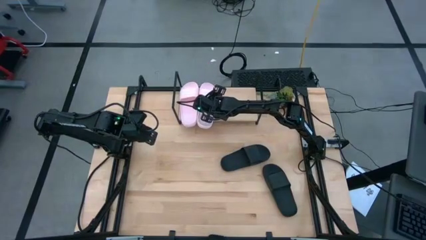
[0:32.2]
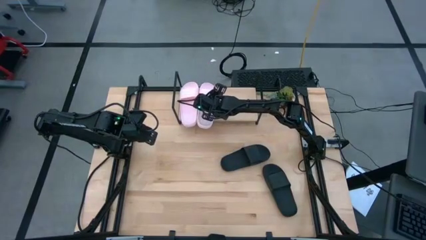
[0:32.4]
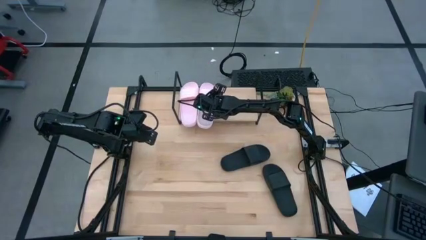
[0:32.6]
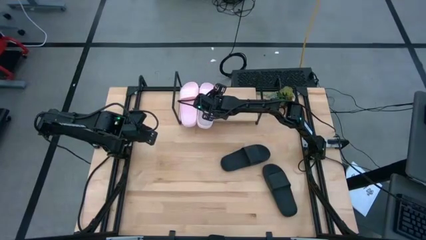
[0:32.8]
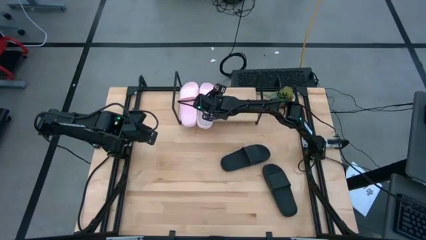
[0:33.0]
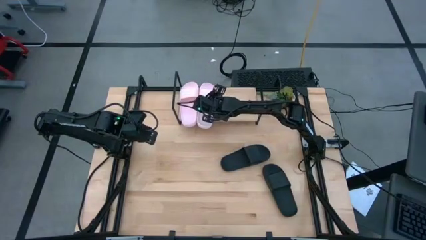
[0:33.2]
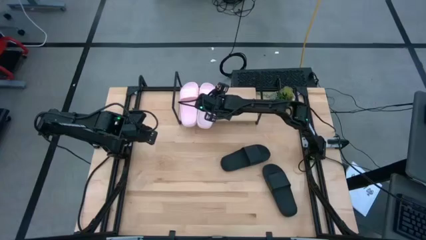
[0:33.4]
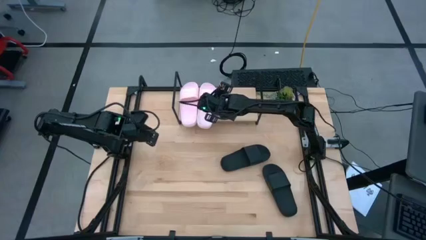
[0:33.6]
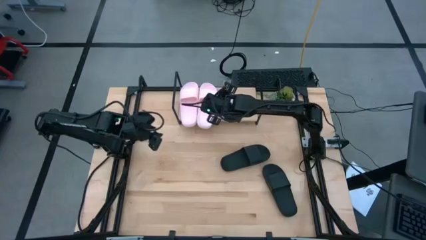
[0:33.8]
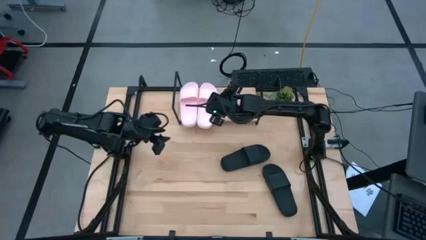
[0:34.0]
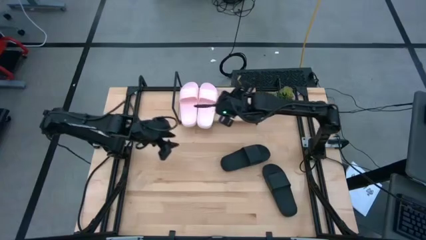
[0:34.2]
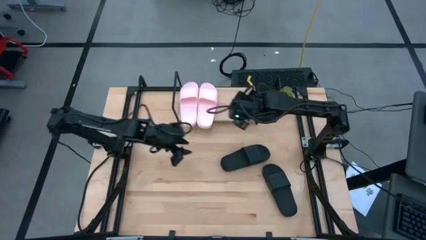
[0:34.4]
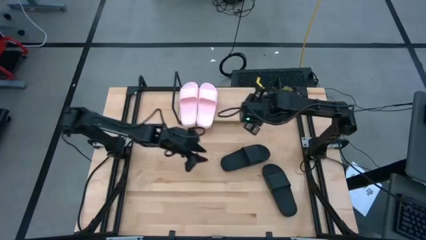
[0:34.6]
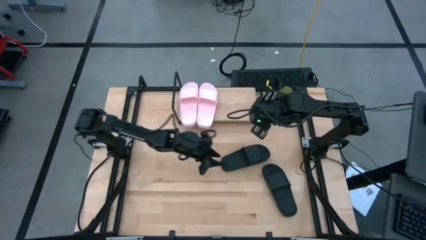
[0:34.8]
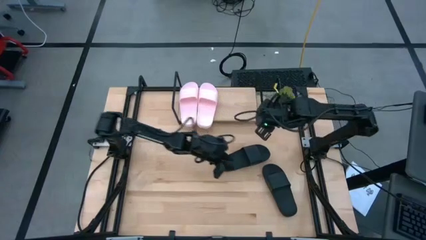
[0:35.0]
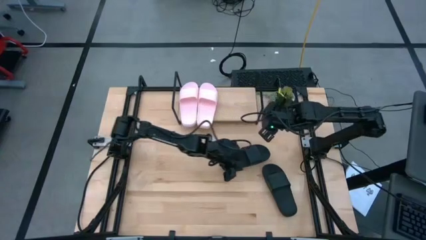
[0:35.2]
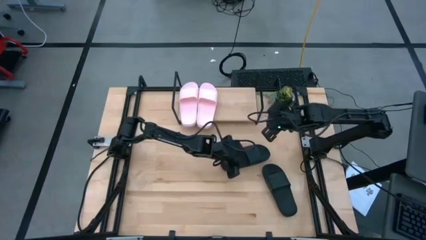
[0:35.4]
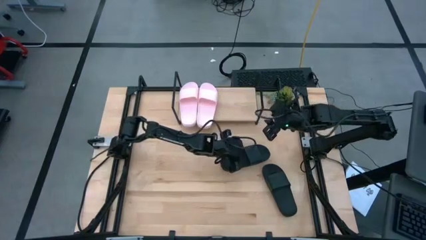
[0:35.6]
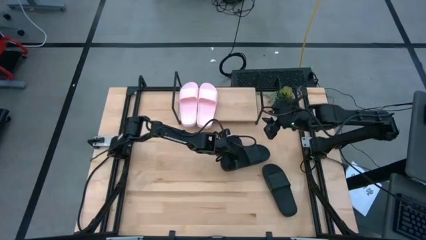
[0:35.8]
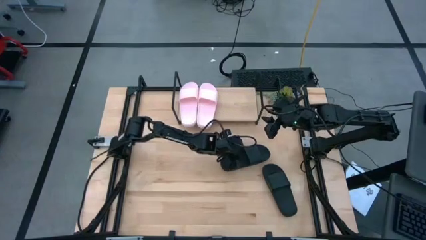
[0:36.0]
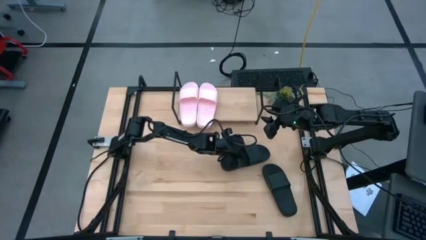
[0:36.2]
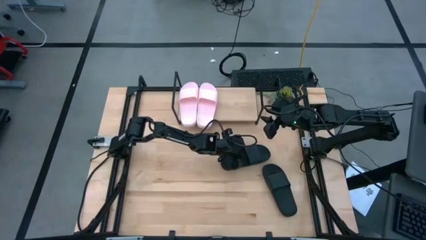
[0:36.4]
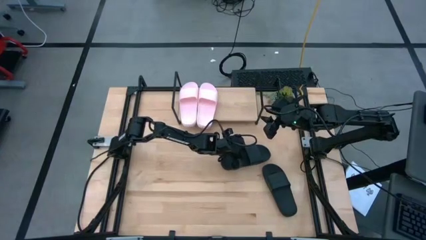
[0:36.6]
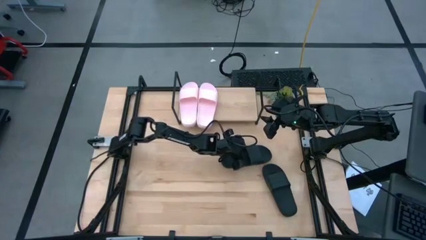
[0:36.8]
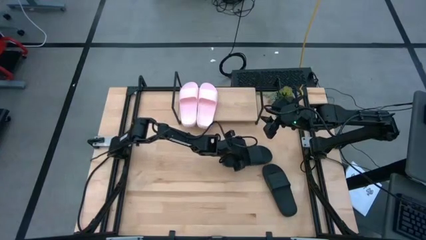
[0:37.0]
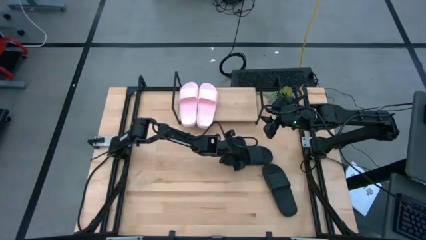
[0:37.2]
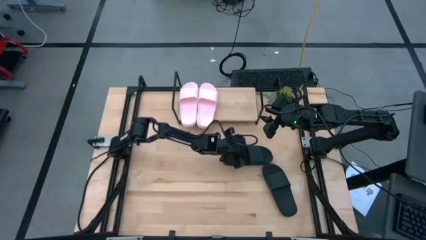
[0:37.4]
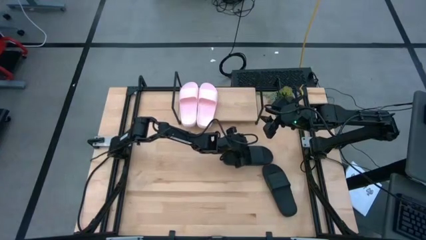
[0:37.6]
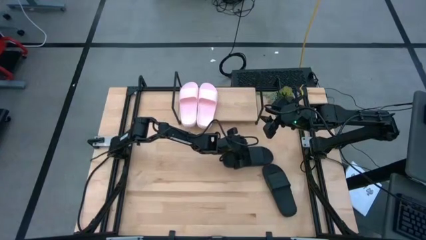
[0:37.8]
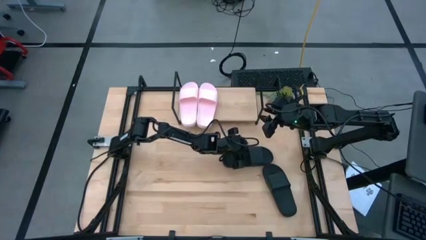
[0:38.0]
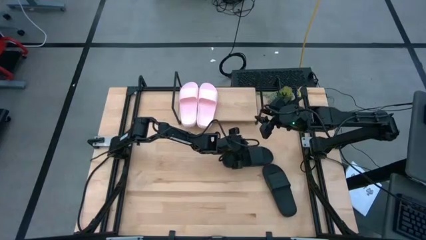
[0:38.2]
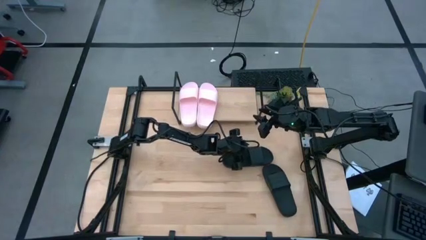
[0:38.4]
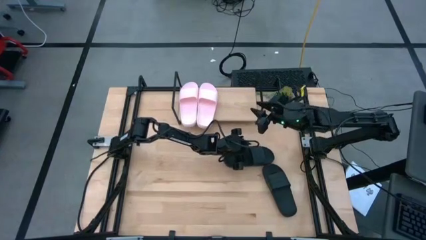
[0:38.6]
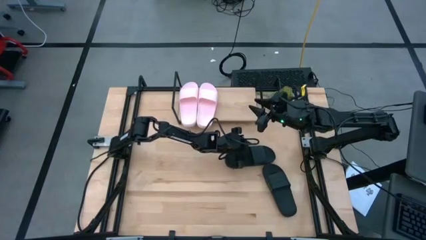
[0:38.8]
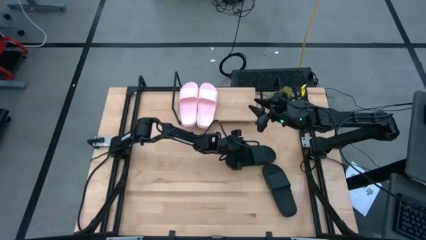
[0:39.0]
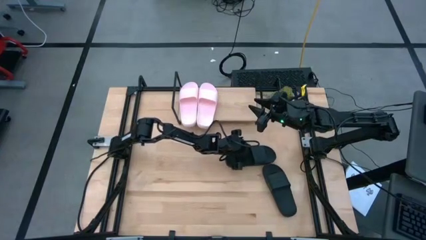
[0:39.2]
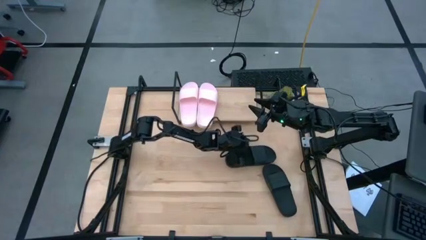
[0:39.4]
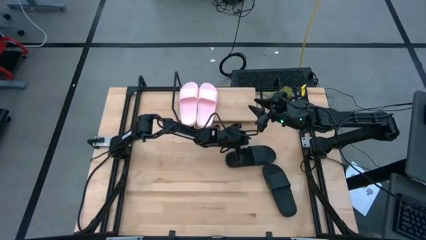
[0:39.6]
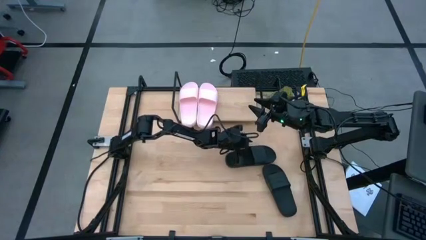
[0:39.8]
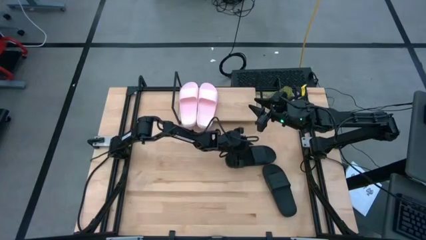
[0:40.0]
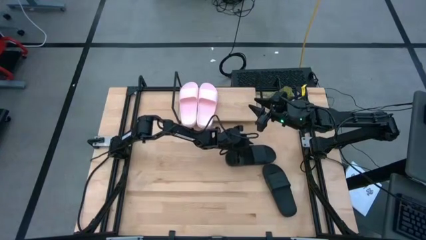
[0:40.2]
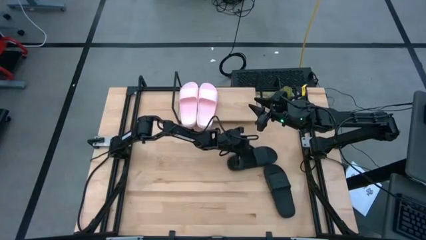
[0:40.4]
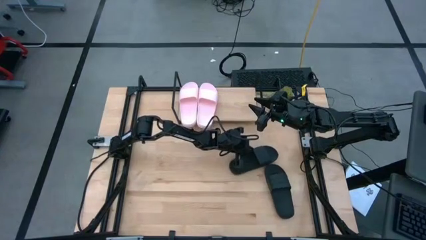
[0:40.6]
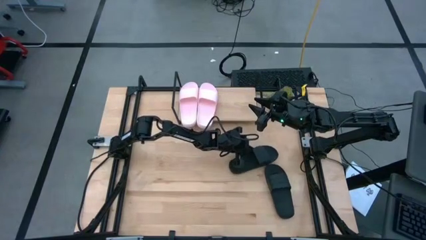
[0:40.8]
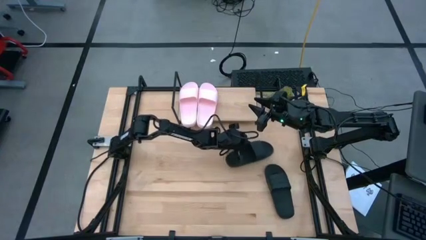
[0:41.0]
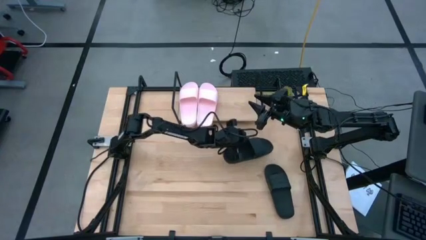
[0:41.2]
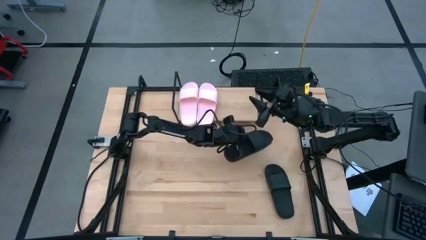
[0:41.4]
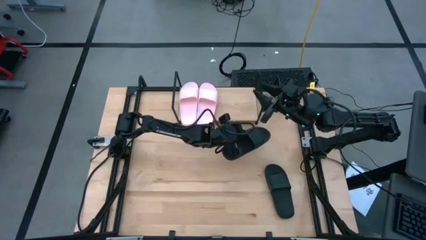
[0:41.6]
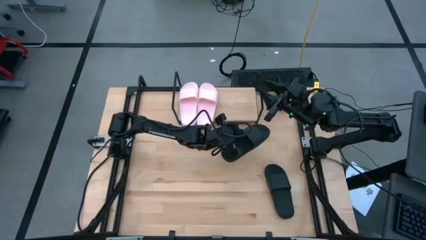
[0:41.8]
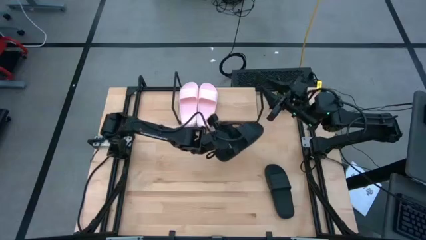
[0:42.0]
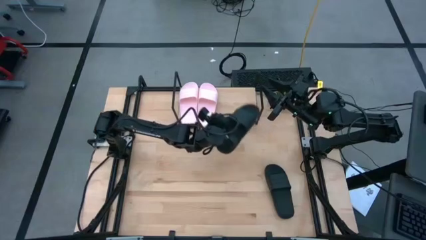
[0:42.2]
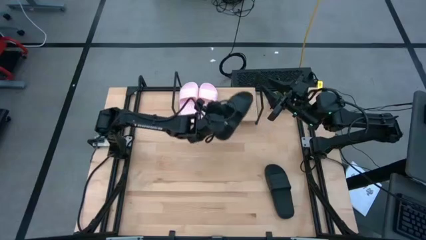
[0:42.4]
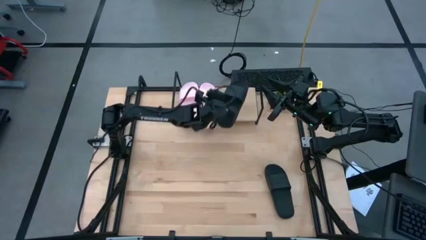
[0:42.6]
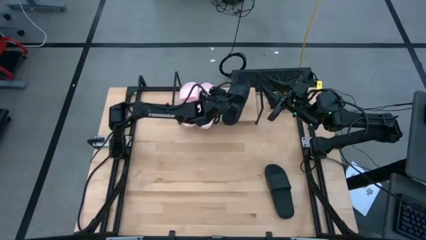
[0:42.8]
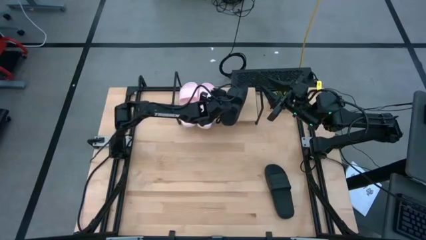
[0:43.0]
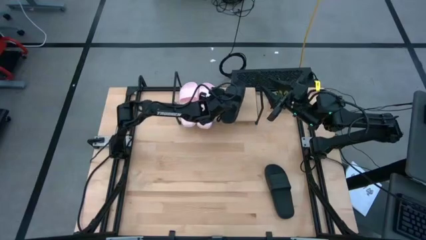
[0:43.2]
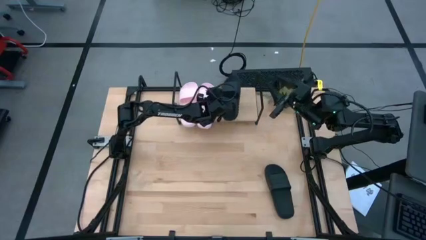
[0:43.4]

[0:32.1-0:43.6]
Task: Pick and place slides into the shelf
Put the top black slipper on the shelf
